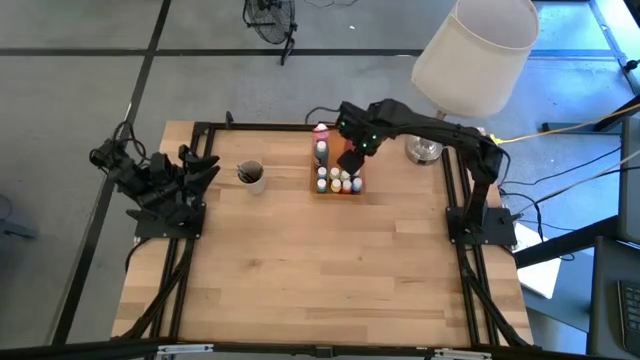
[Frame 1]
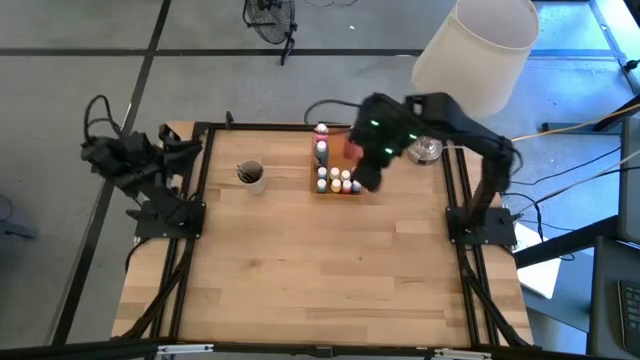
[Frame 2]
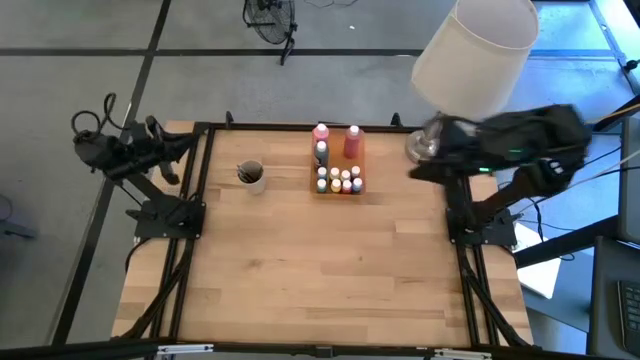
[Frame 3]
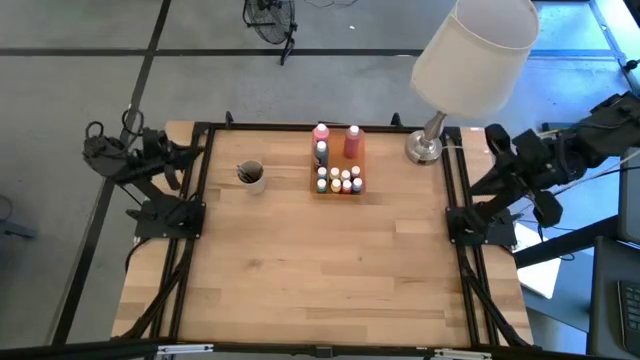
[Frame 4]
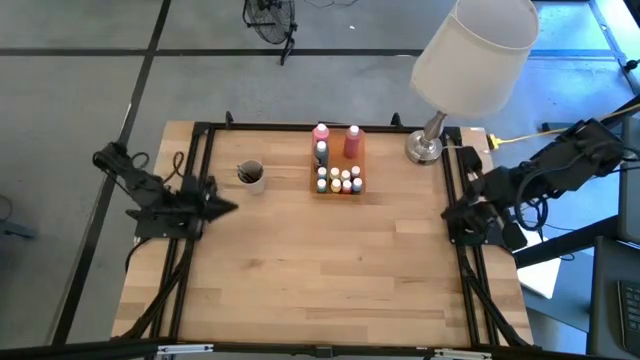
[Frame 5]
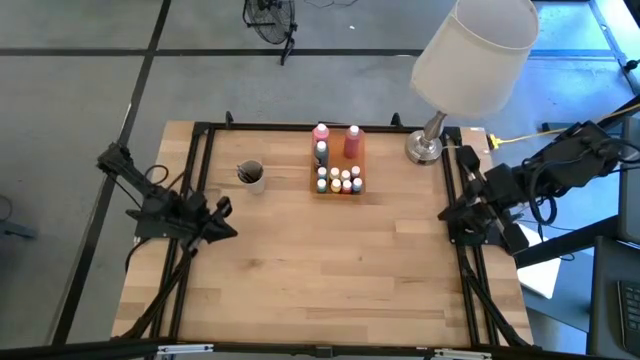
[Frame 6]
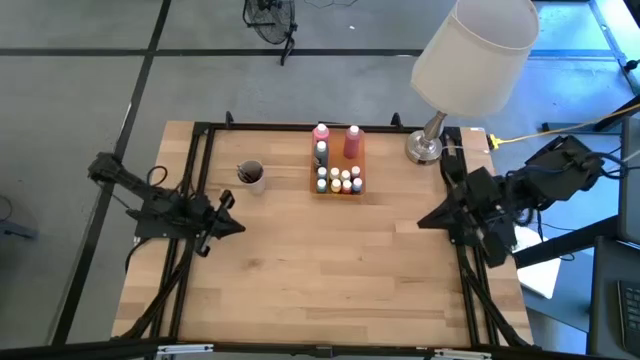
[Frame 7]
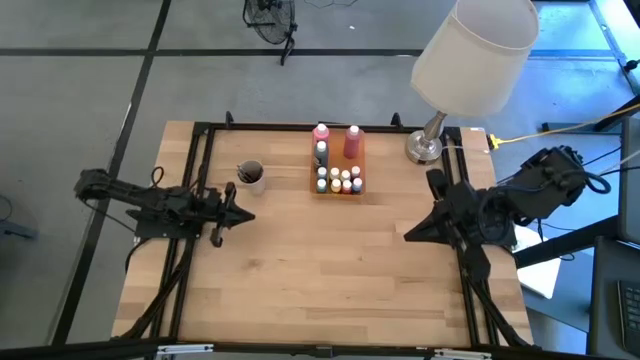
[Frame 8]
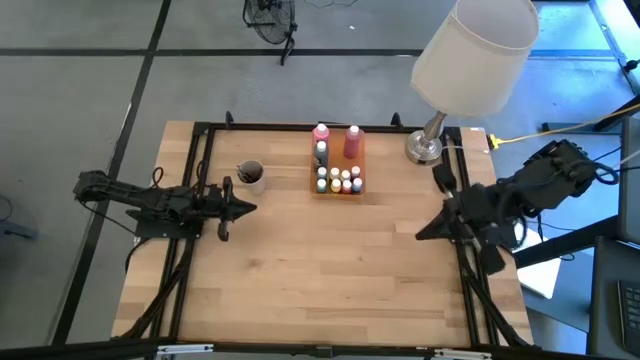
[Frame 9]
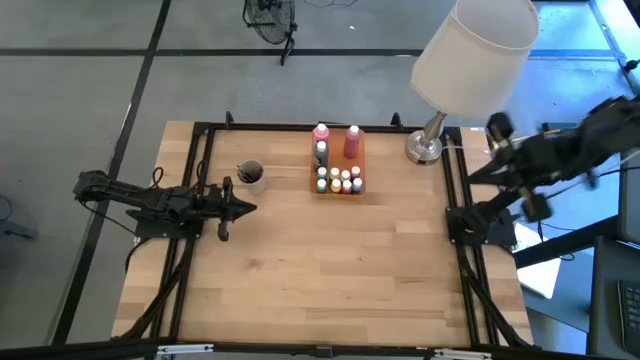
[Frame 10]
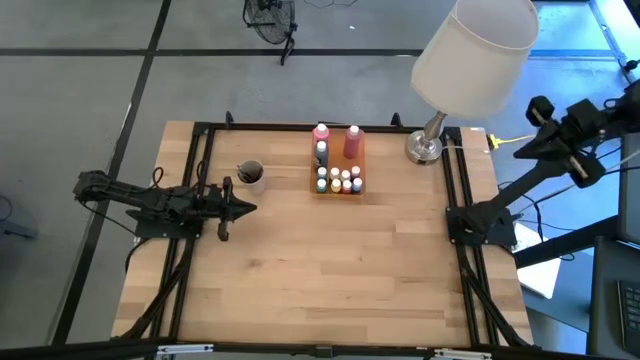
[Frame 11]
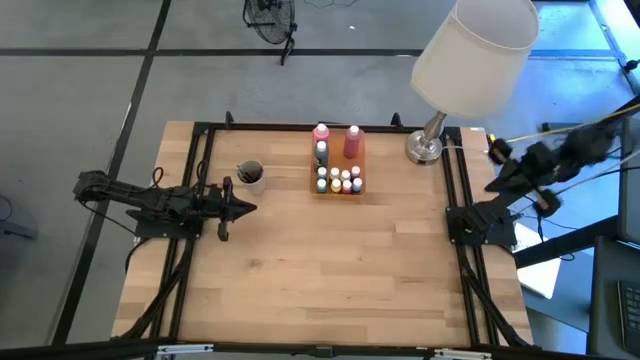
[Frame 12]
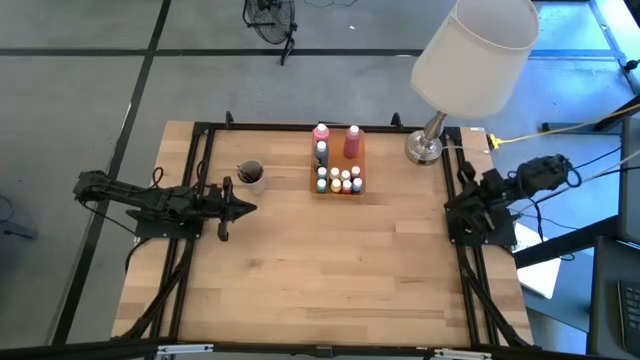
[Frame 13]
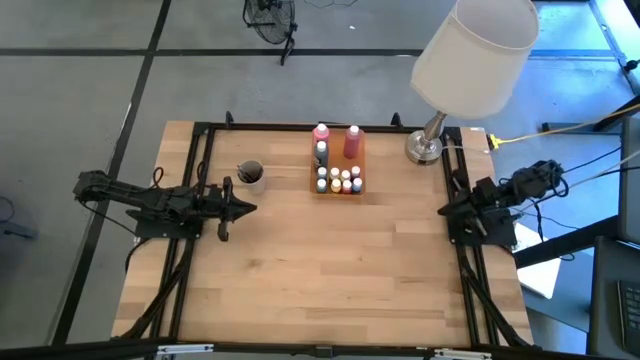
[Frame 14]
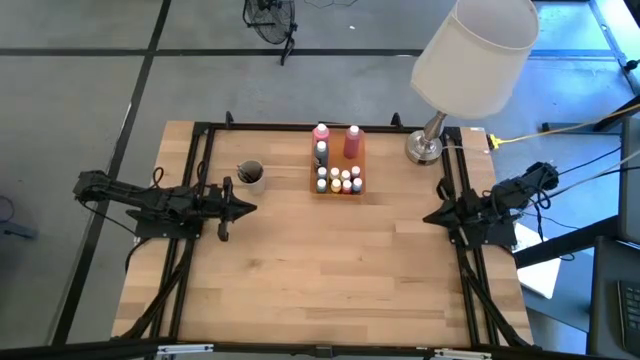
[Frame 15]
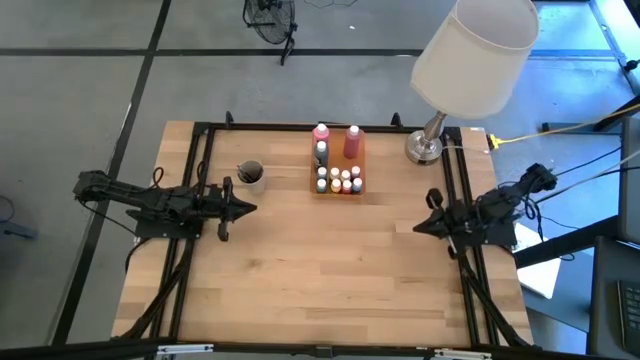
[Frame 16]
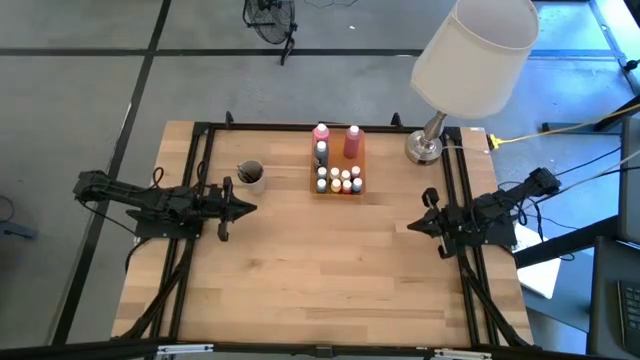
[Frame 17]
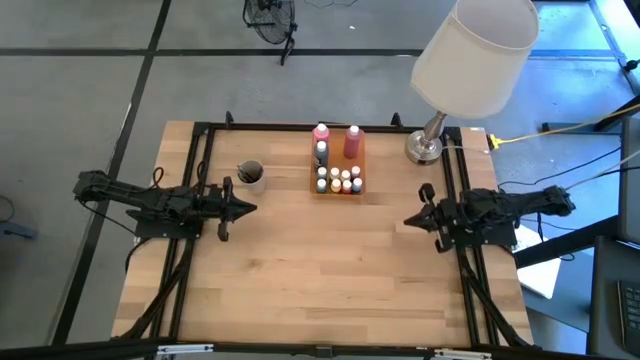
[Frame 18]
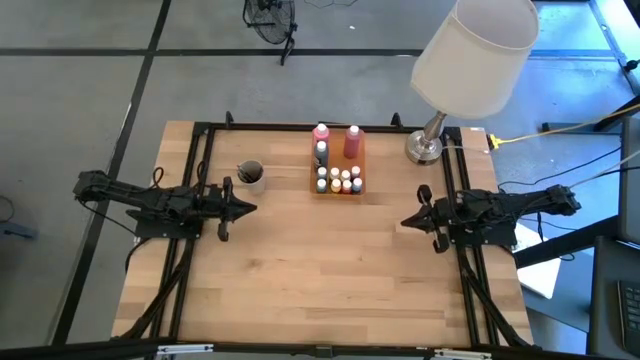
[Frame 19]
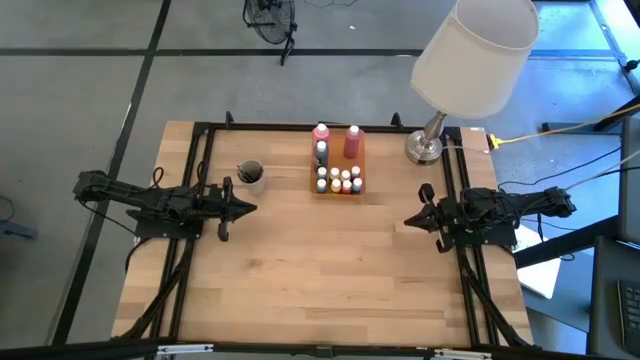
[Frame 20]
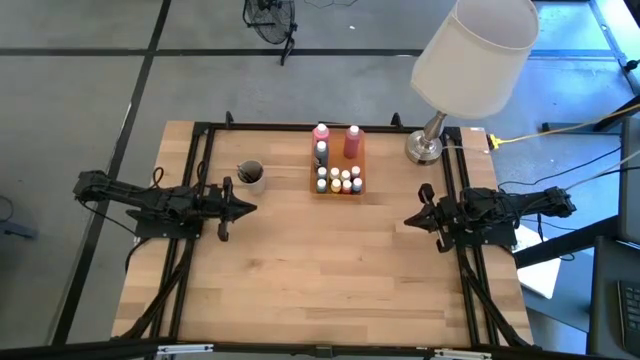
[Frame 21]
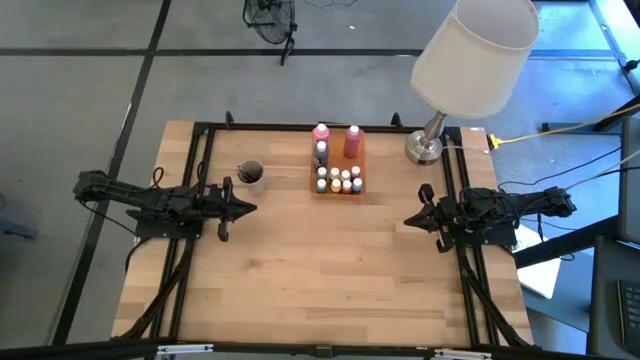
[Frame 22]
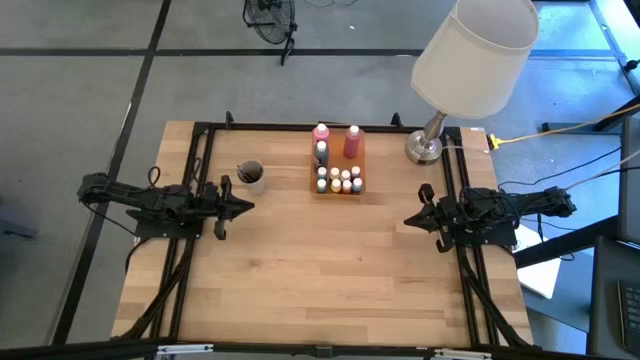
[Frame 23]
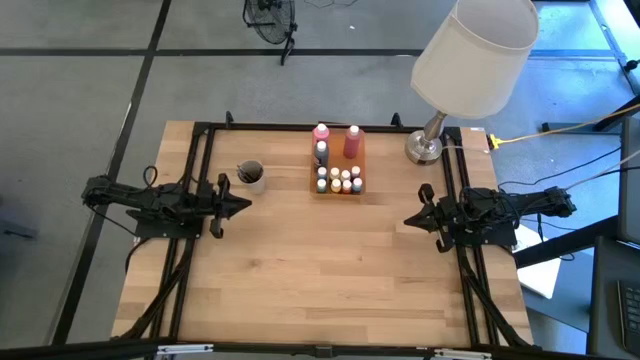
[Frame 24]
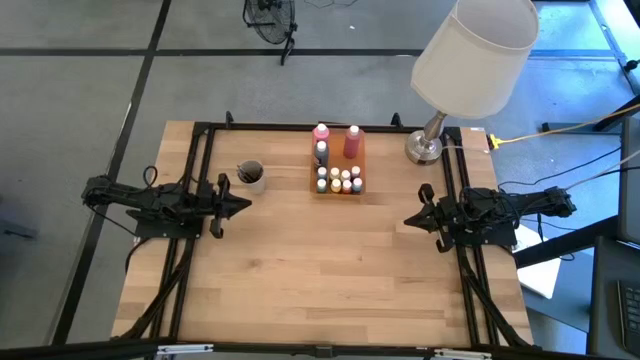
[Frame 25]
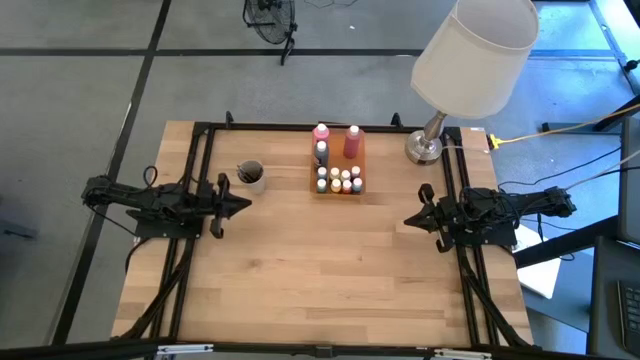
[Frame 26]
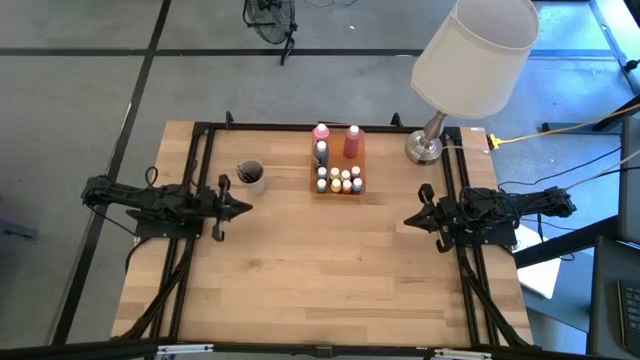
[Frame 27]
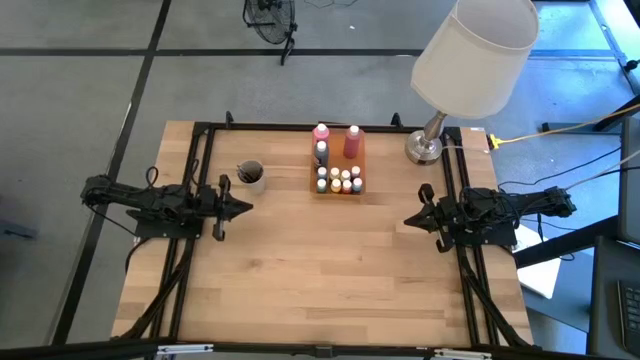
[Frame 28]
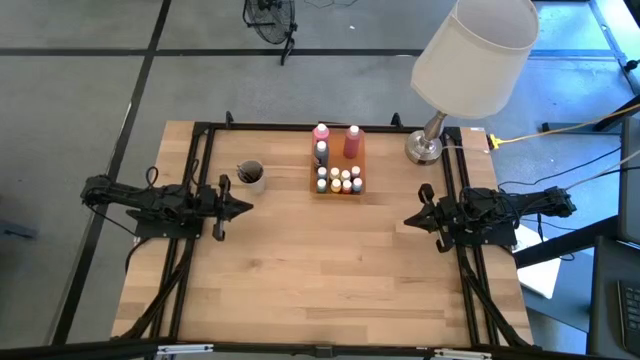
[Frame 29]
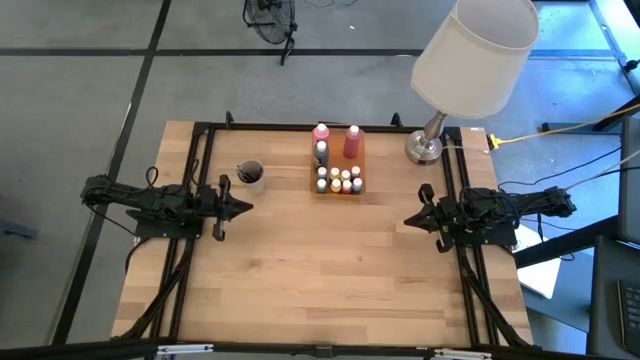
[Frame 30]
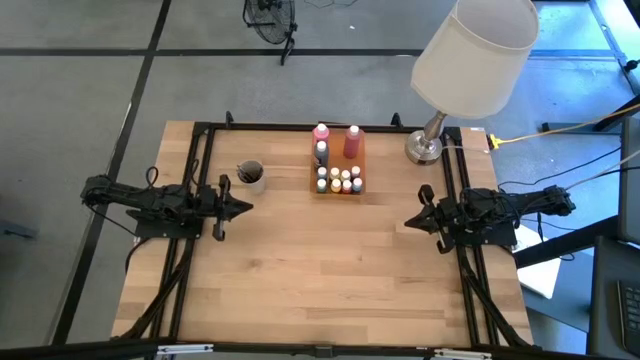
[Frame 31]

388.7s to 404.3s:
Task: Pick & Place Paint Supplies
Return to Home Position

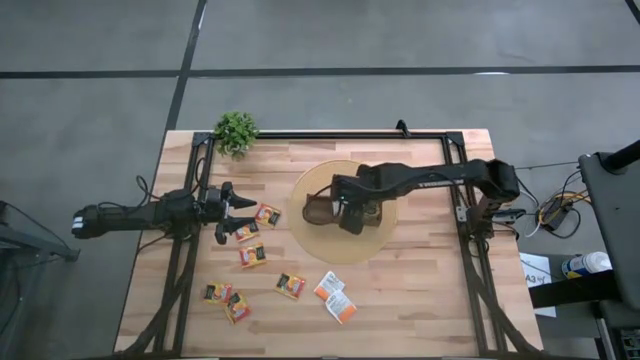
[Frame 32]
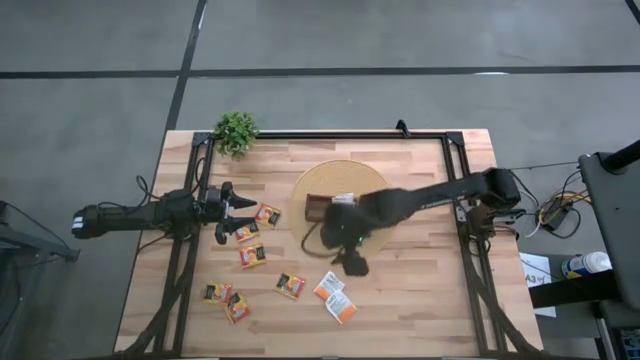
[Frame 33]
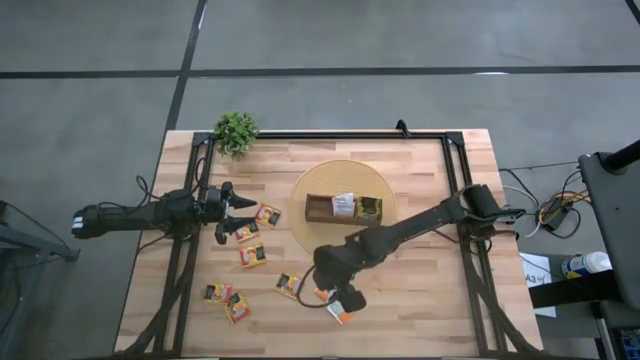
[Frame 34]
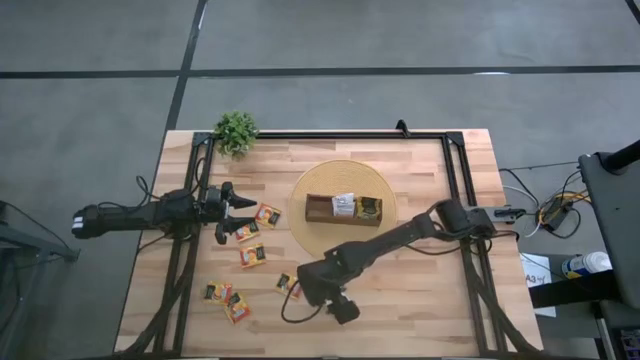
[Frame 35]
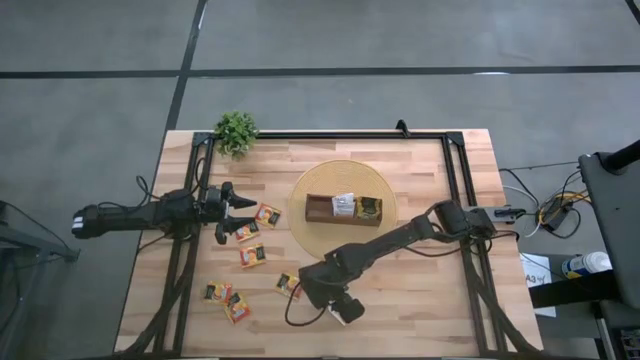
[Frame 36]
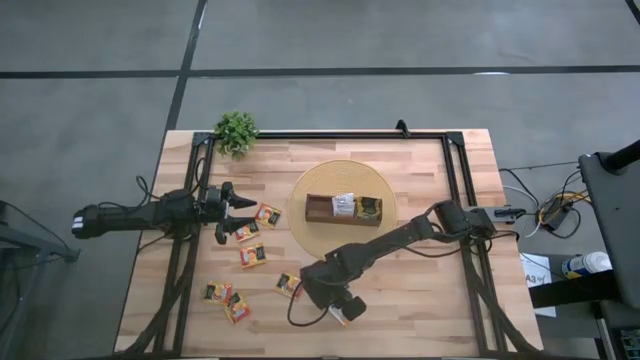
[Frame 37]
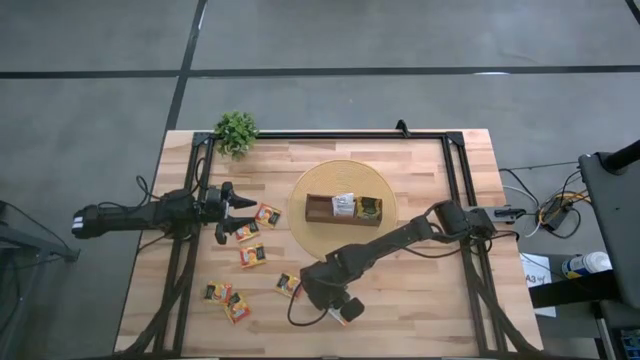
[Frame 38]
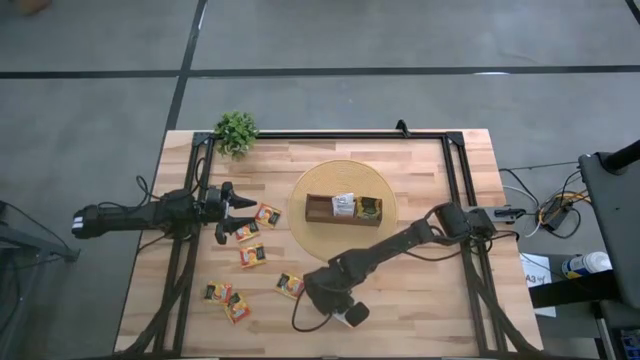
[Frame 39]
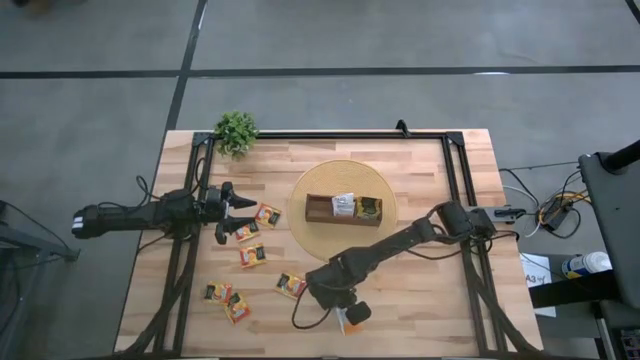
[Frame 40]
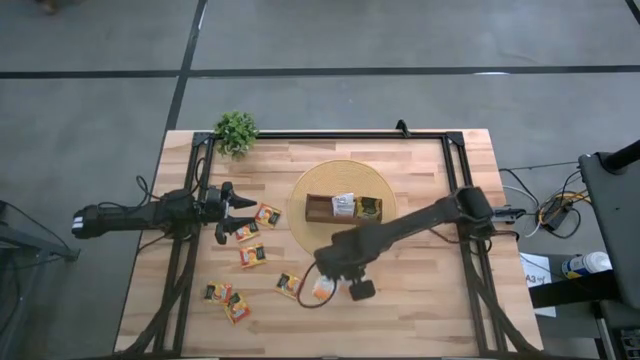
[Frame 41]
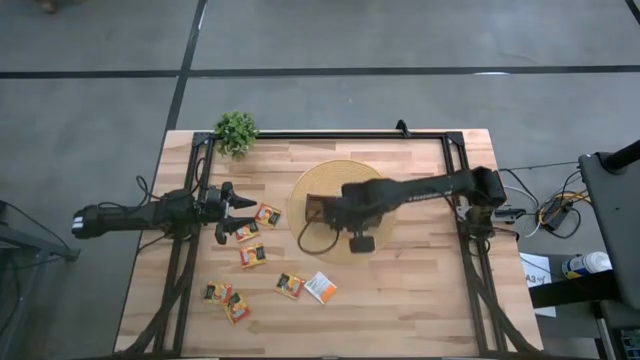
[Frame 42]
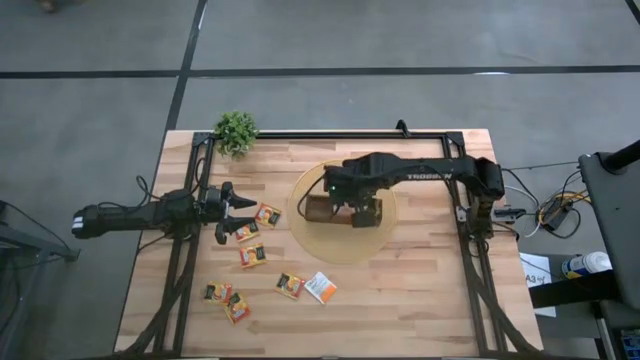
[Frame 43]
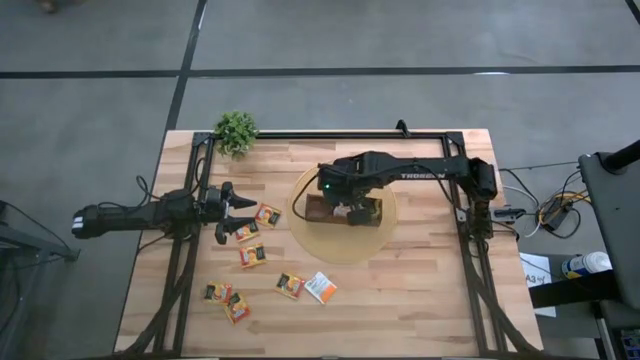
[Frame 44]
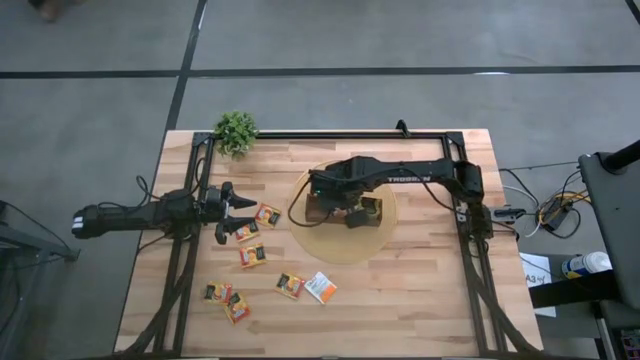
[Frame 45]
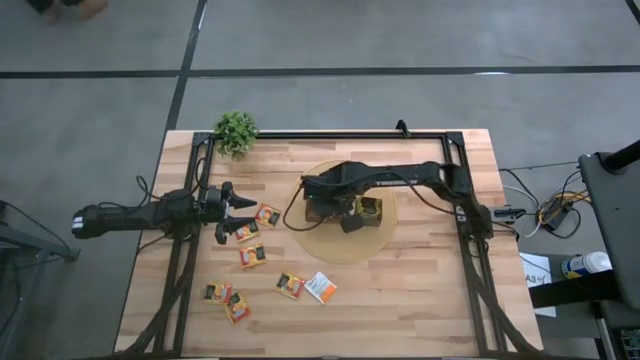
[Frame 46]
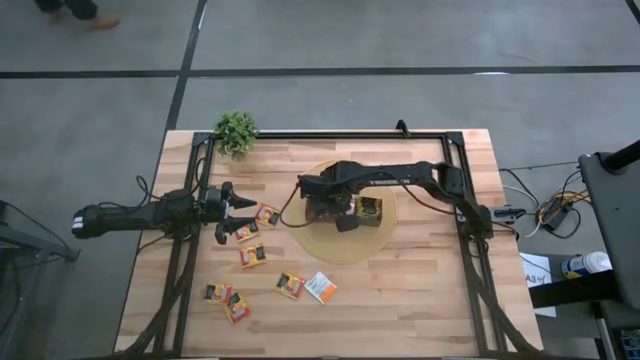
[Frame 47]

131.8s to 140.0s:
Task: Pick & Place Tea
Put the white tea bag into the middle section of the wooden organizer
